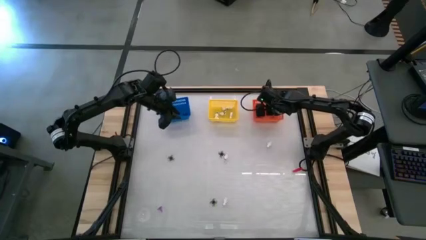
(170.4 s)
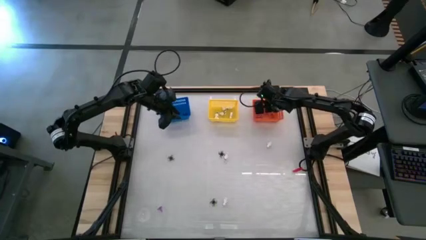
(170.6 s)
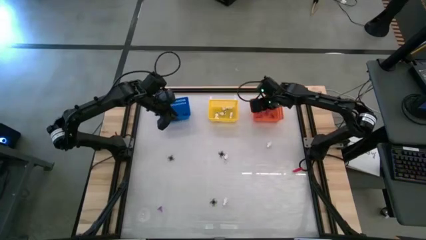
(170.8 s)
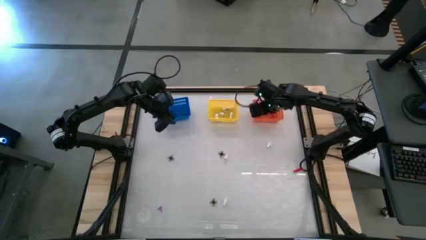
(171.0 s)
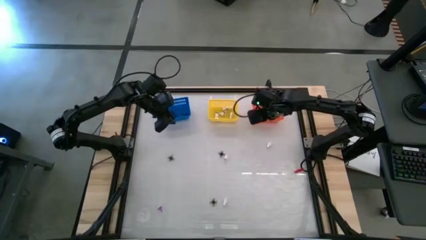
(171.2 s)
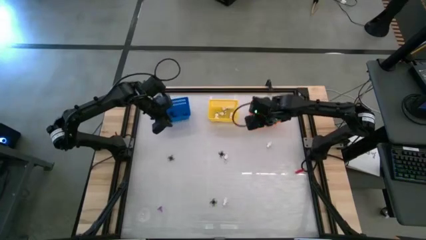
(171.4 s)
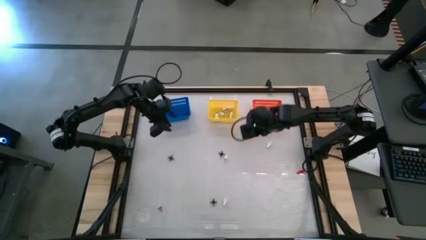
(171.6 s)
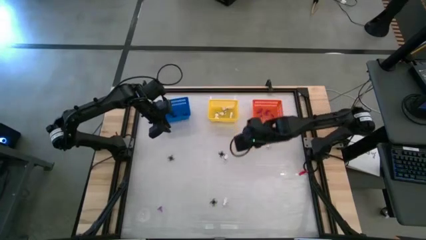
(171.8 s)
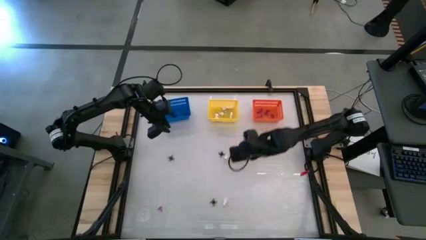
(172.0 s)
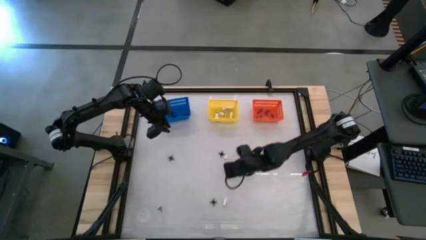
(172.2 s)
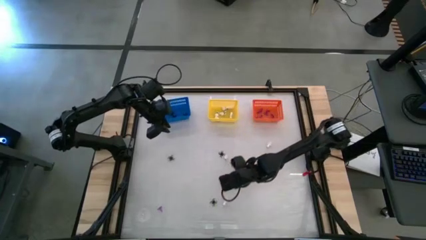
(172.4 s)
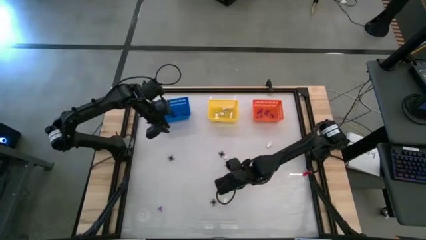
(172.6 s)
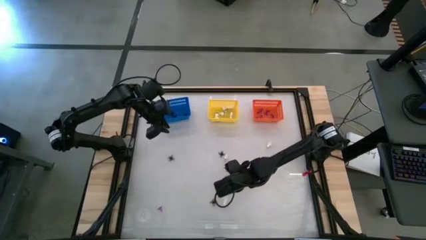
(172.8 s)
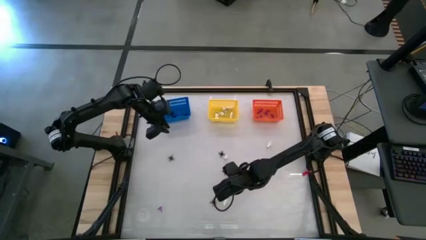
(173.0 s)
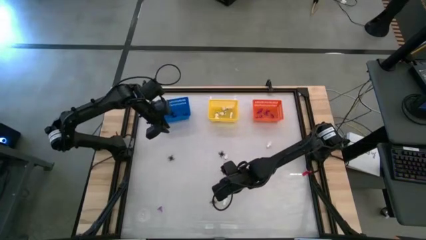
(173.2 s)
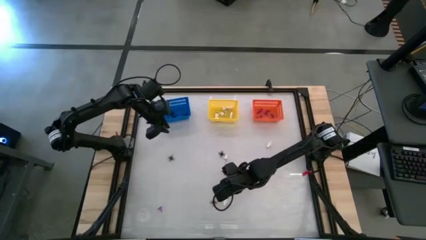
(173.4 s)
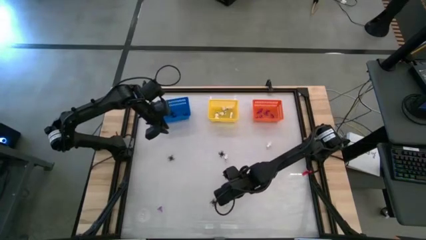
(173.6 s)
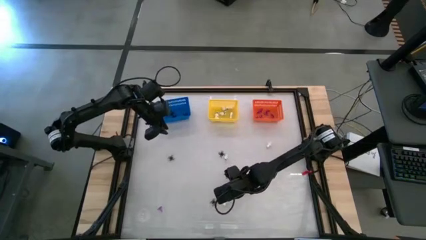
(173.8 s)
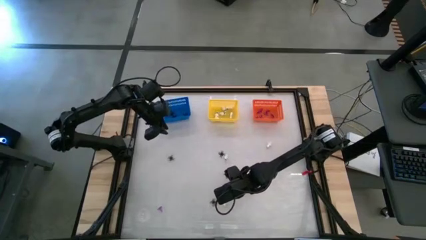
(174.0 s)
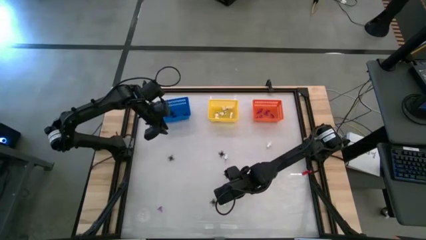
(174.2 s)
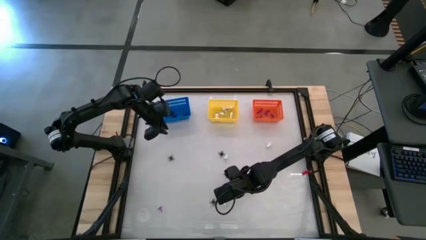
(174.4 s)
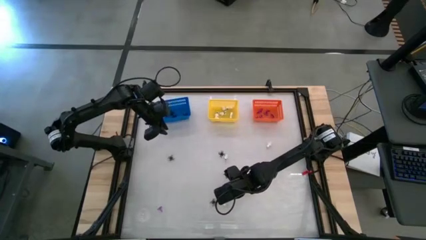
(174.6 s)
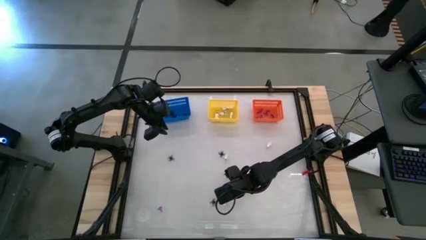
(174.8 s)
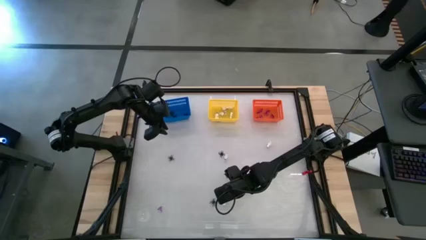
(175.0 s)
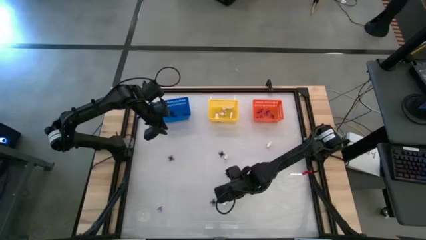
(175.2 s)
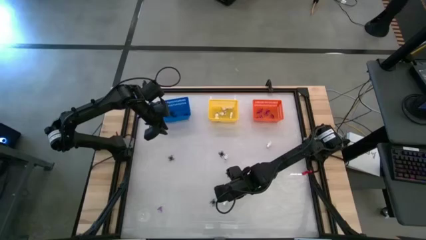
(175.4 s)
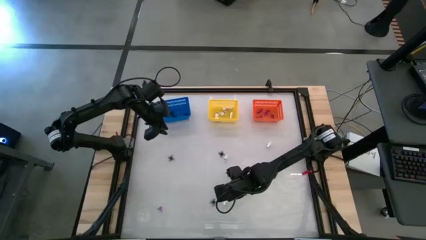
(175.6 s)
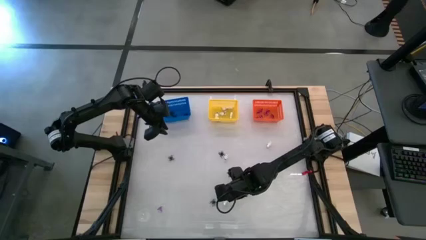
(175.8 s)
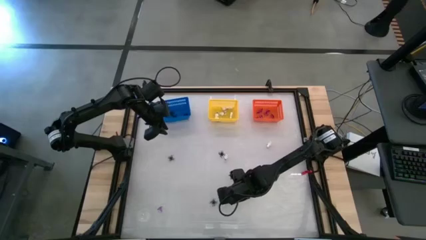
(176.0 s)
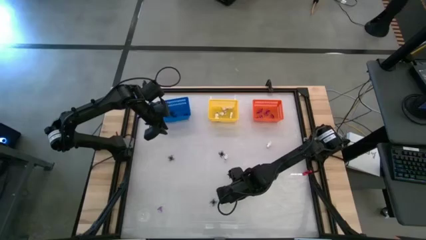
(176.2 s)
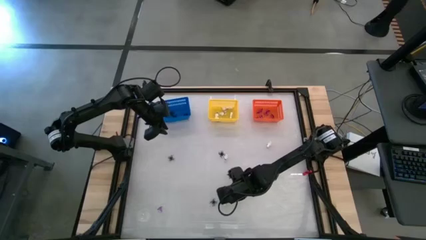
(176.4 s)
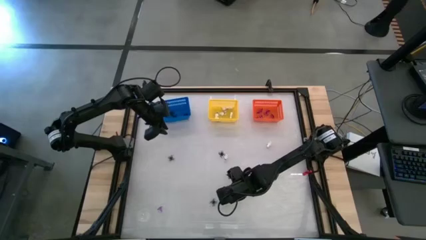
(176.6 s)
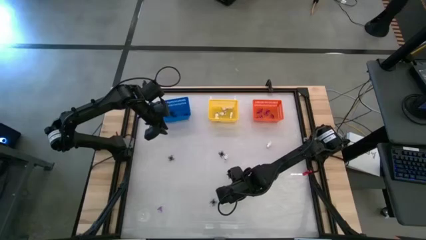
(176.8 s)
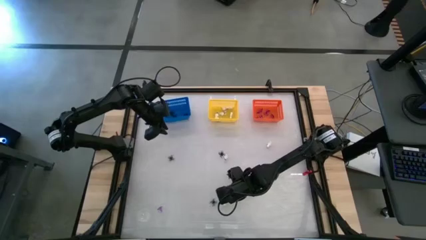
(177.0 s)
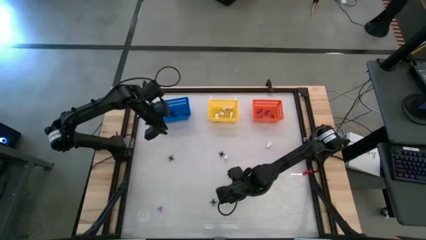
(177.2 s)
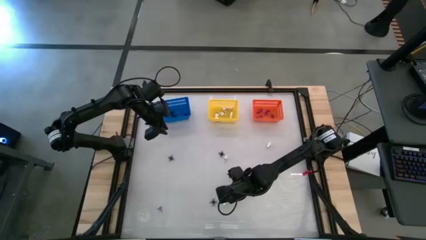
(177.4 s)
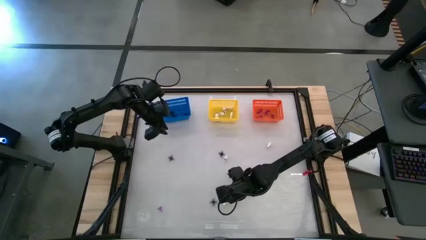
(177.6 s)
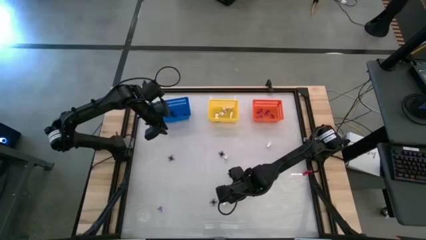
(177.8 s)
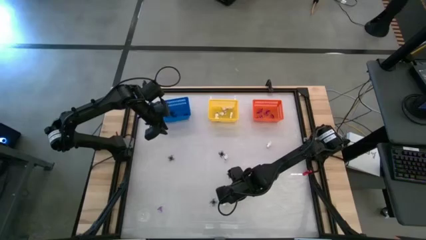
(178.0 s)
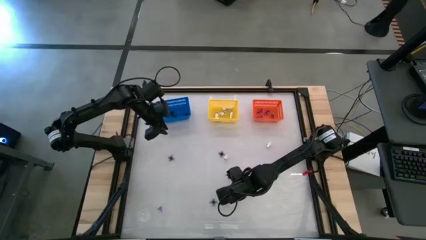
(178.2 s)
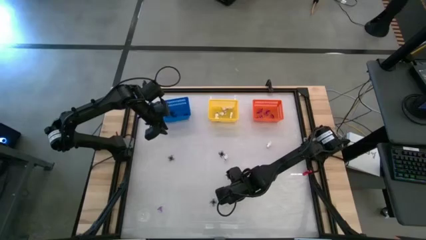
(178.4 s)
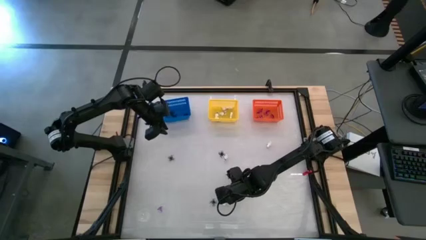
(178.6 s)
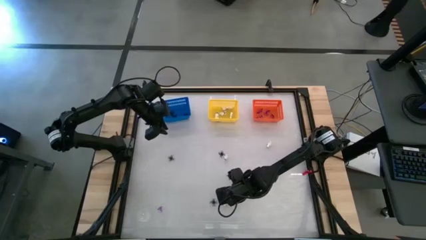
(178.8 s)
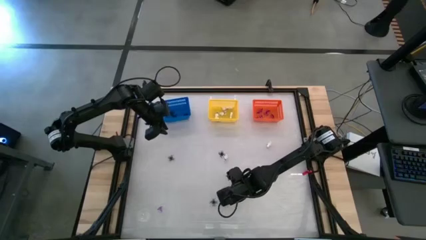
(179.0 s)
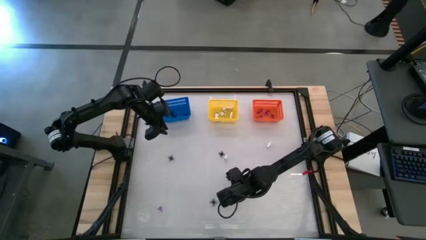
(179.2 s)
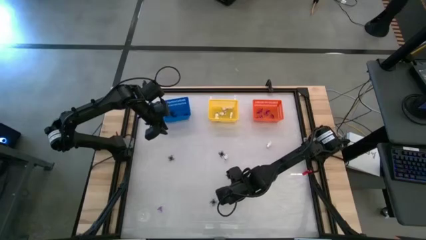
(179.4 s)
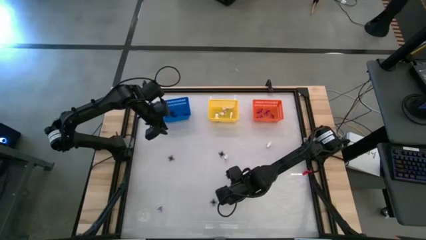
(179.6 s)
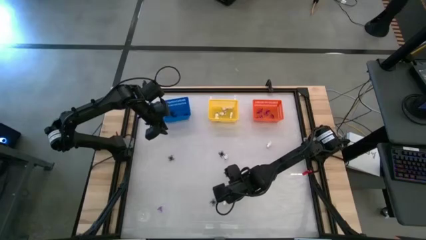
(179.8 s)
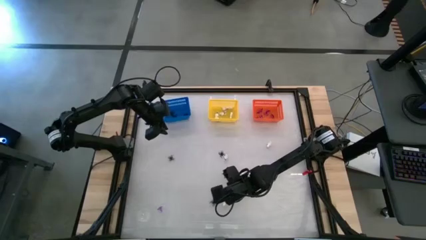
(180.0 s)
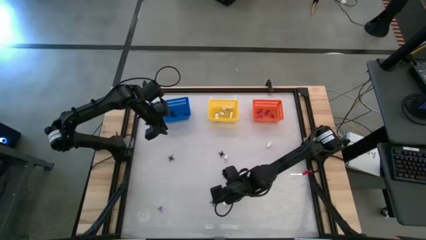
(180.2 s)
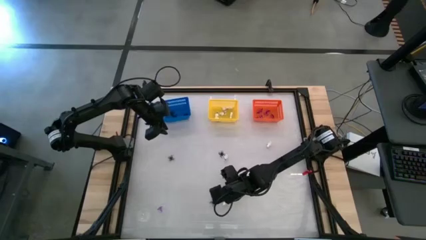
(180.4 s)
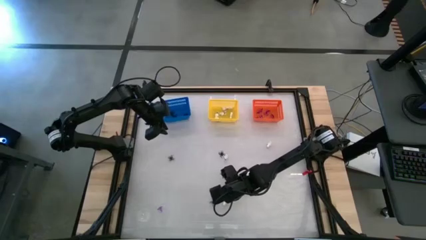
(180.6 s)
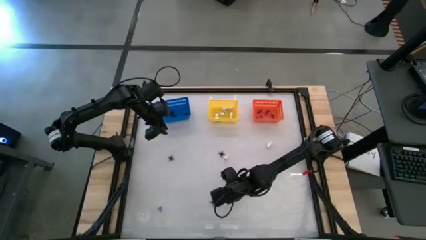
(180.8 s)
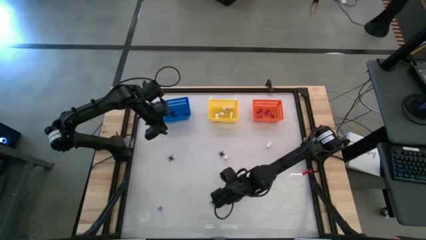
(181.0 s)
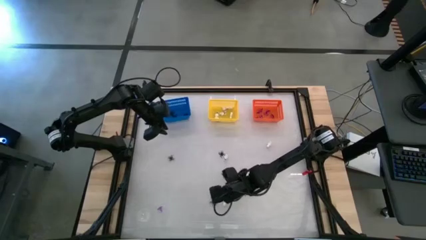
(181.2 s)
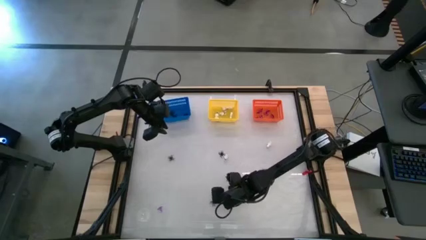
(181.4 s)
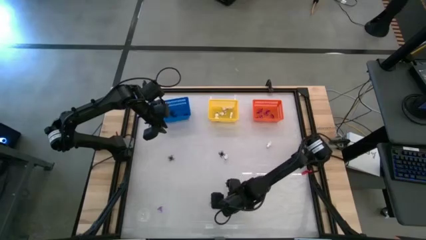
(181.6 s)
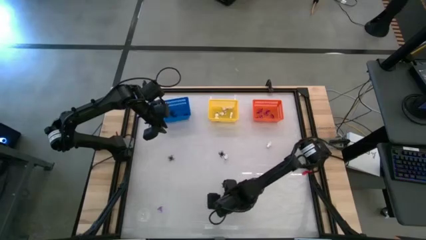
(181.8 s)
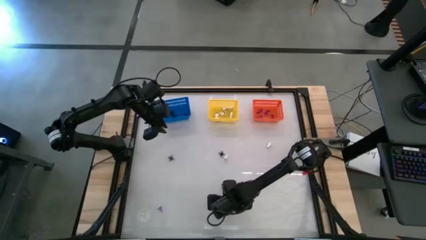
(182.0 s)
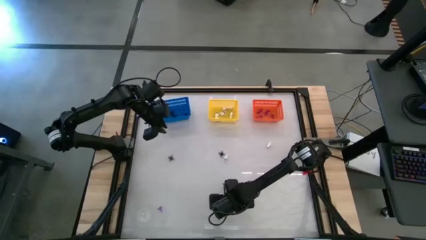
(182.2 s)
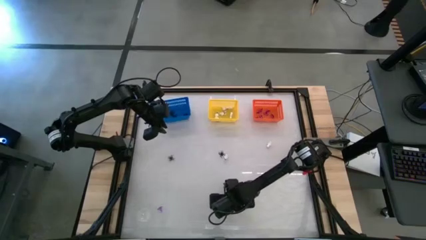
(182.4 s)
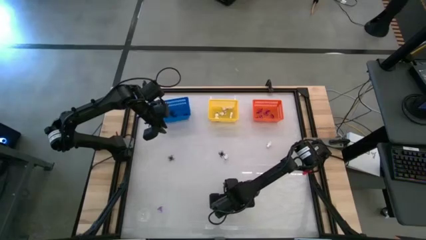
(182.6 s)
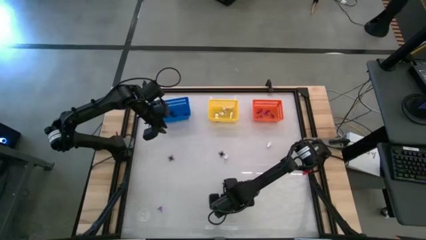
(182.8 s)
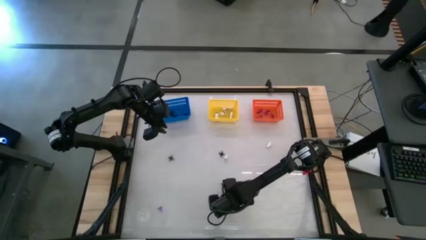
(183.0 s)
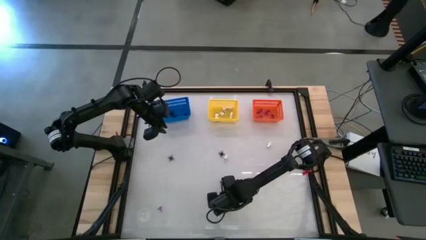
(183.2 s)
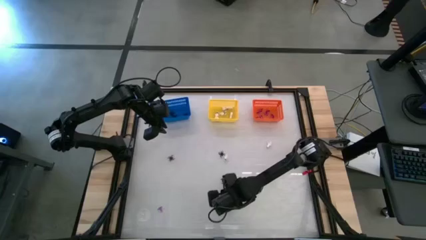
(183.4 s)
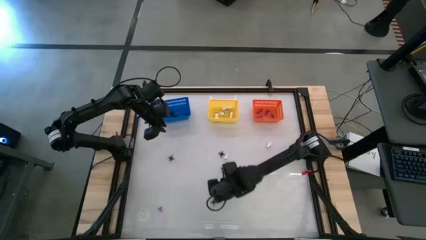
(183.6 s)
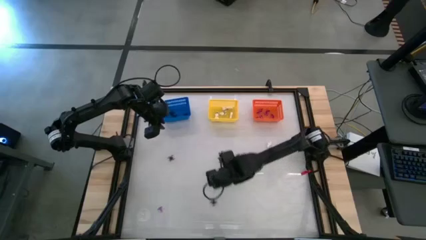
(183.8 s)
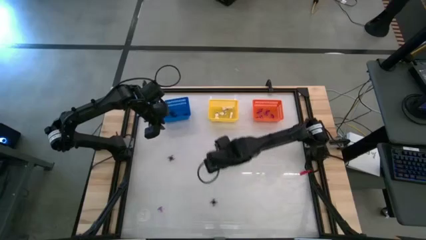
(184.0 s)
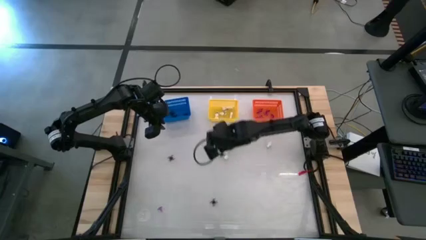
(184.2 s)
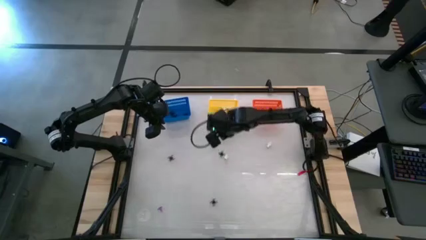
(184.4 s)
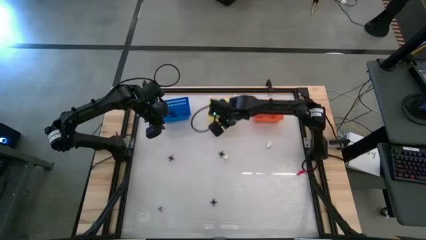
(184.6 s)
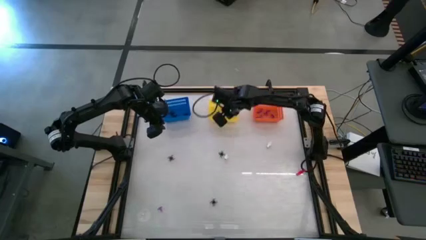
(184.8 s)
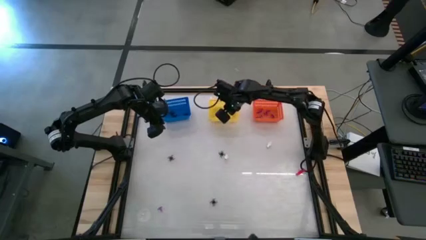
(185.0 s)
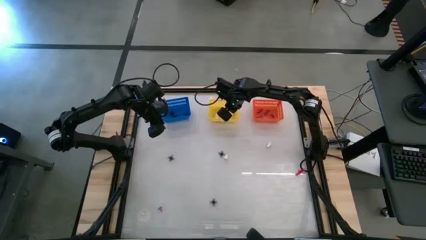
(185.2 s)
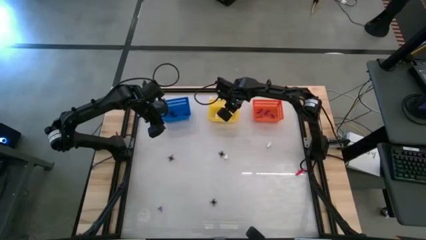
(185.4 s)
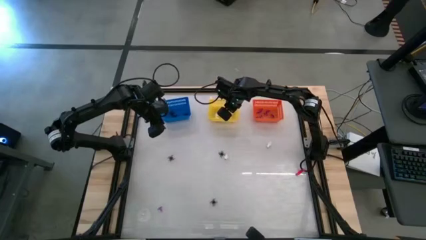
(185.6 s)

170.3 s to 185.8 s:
Task: Sort Halloween decoration
Put the white skeleton toy into the yellow basket

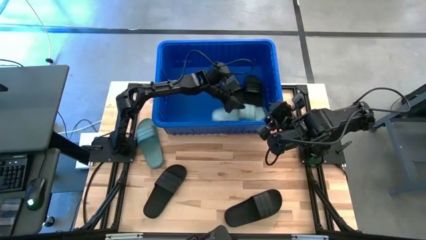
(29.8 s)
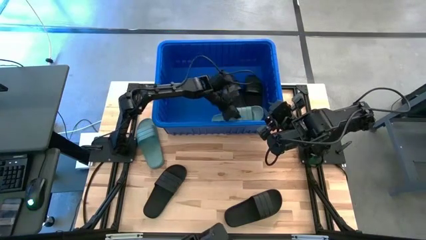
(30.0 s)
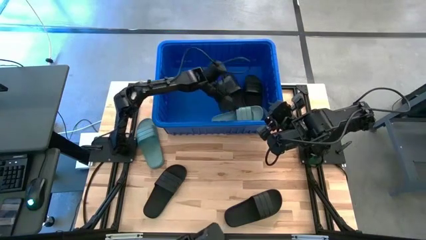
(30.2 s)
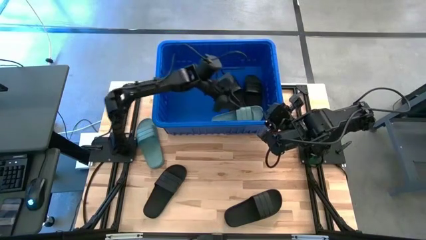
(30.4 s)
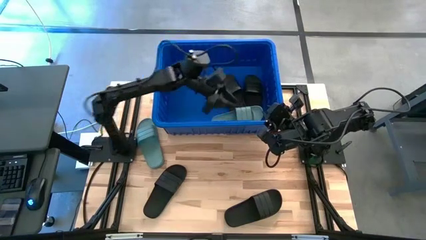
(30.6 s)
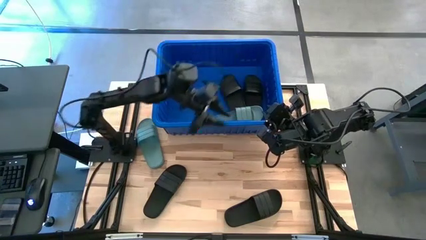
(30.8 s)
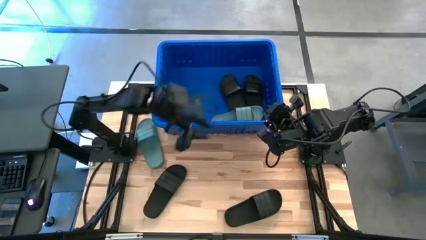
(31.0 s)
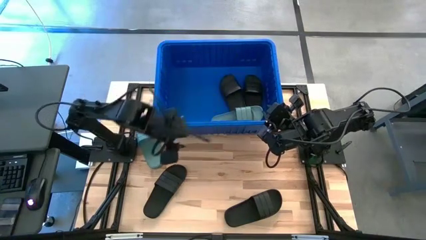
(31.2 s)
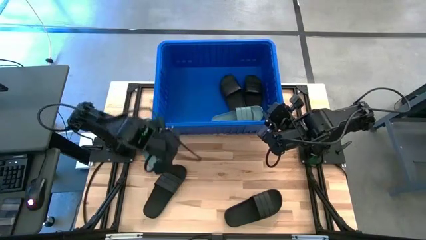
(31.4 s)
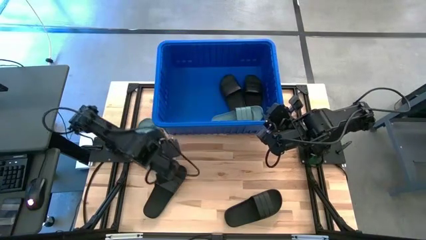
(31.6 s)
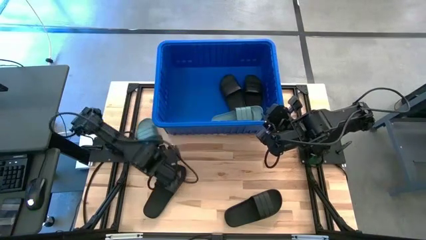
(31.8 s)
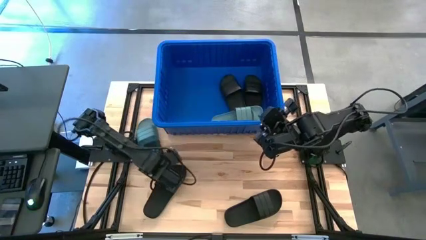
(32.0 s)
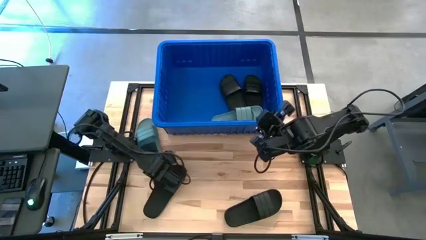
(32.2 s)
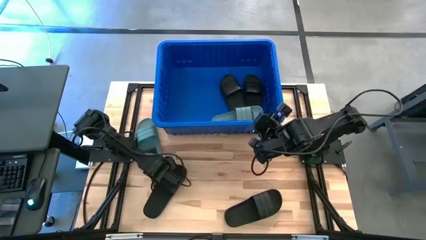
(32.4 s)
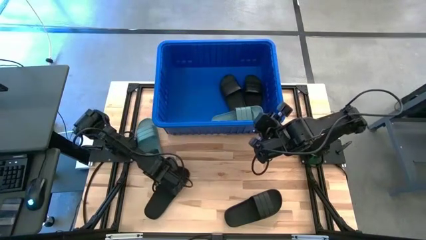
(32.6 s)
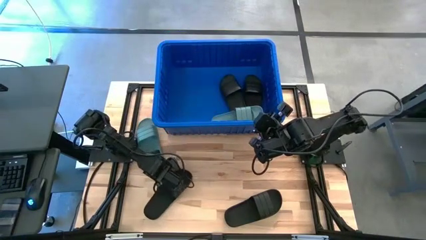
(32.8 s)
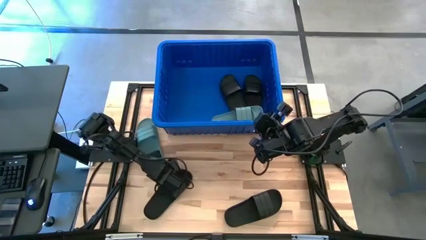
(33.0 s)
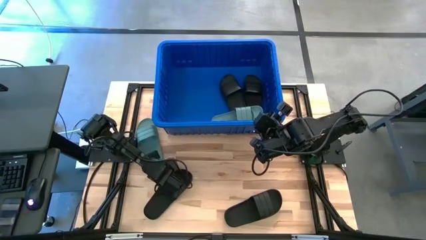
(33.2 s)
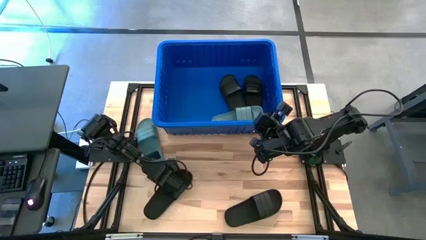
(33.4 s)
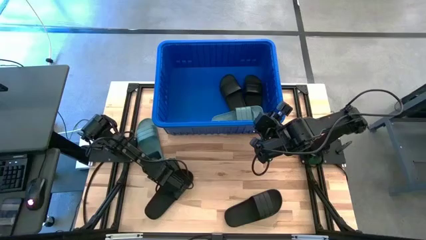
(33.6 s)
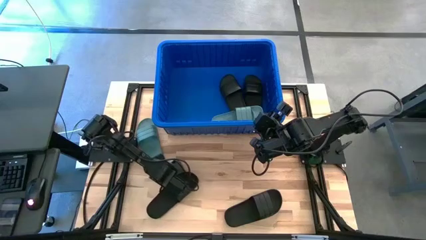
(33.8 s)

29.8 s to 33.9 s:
Task: Pick and place slides into bin
Put the green slide into the blue bin
